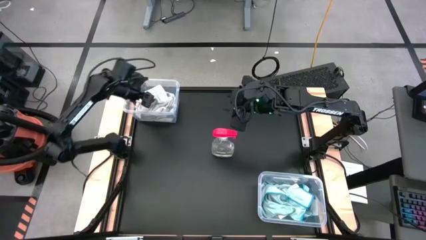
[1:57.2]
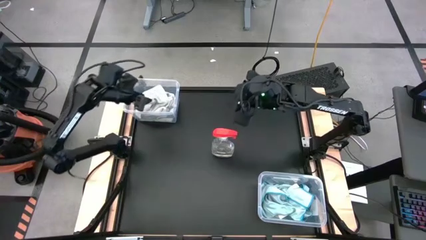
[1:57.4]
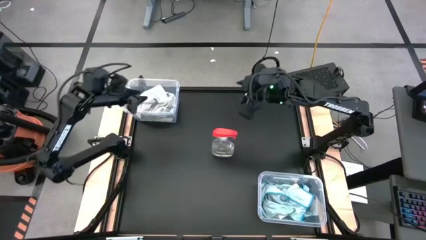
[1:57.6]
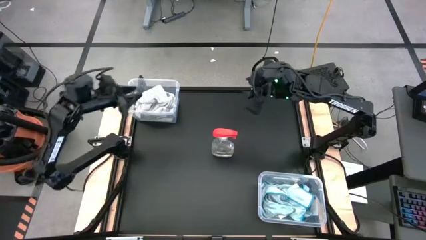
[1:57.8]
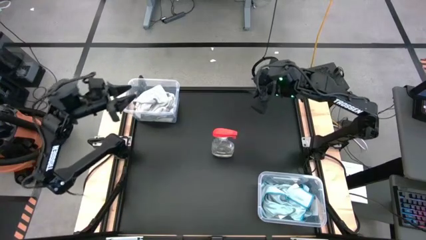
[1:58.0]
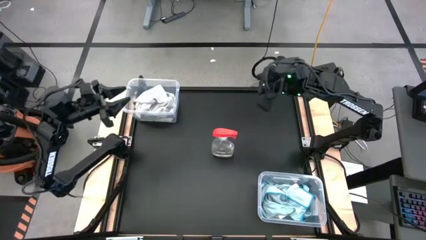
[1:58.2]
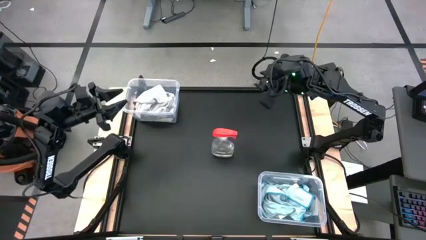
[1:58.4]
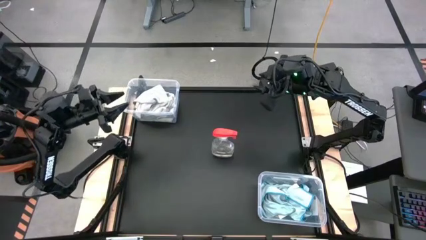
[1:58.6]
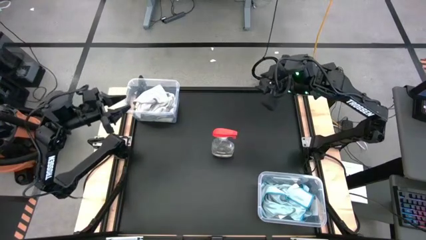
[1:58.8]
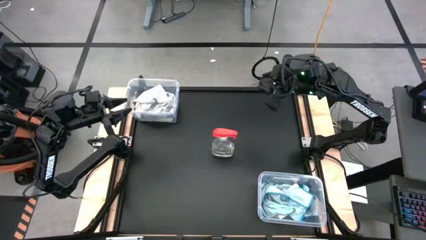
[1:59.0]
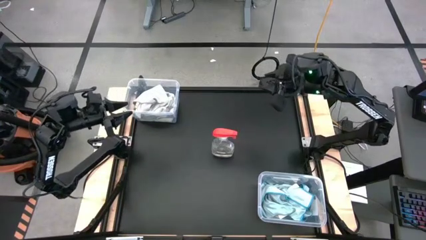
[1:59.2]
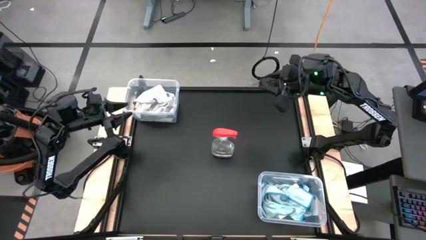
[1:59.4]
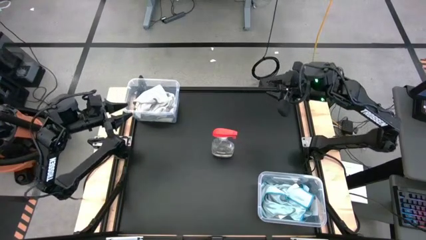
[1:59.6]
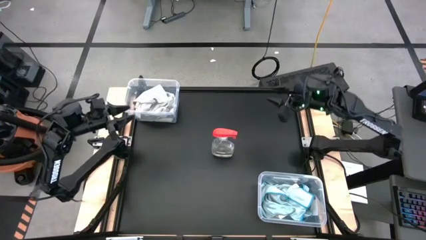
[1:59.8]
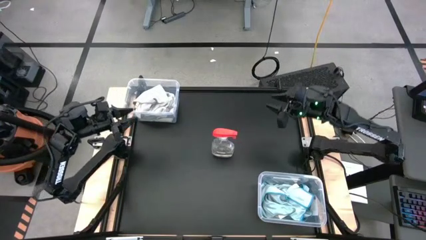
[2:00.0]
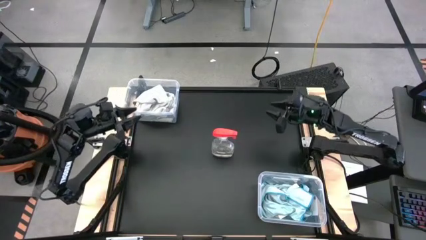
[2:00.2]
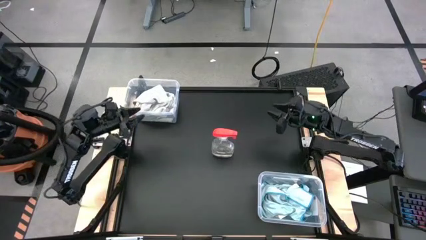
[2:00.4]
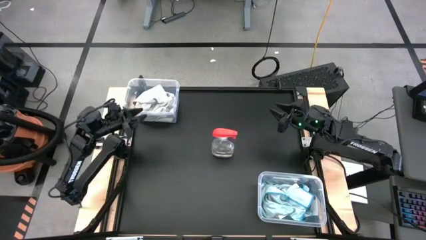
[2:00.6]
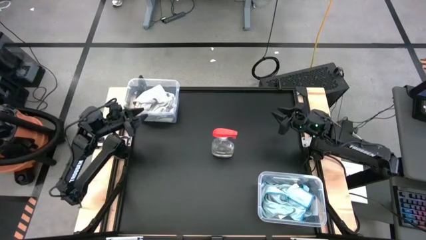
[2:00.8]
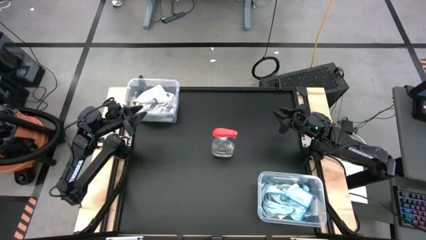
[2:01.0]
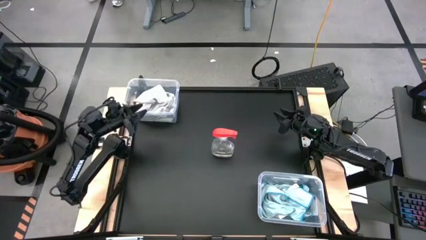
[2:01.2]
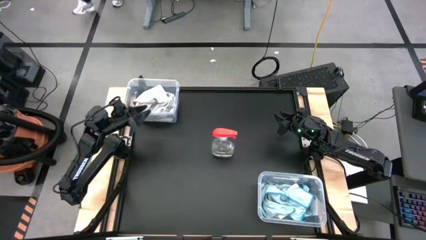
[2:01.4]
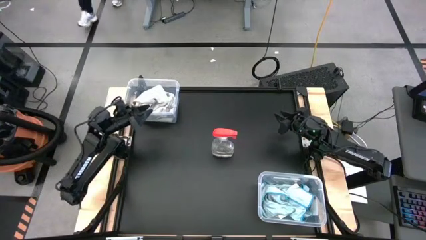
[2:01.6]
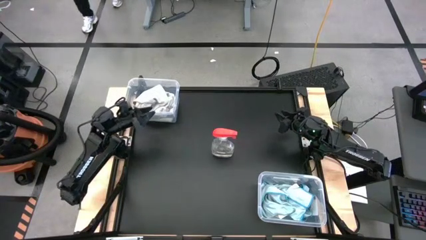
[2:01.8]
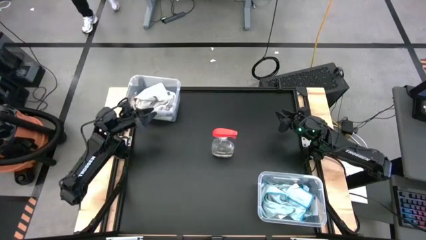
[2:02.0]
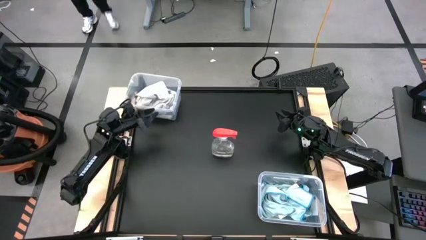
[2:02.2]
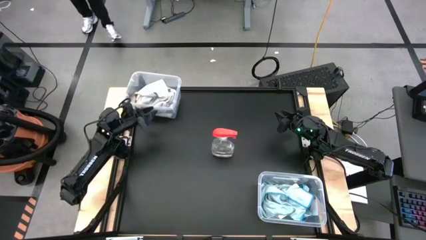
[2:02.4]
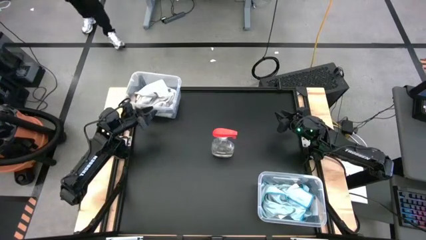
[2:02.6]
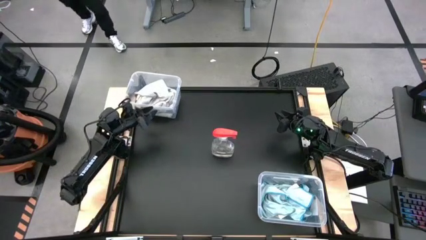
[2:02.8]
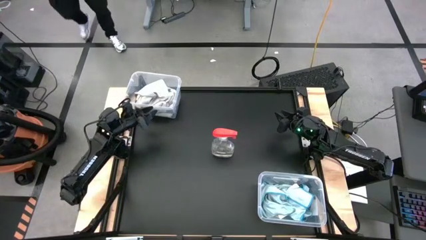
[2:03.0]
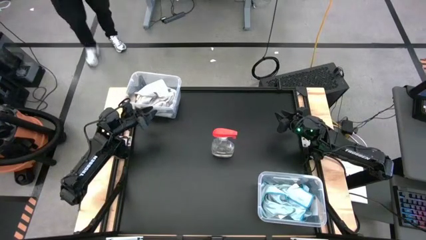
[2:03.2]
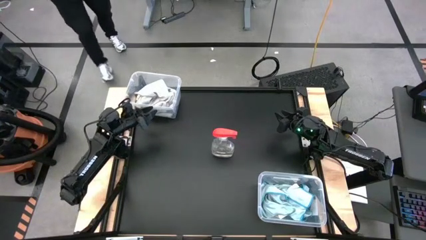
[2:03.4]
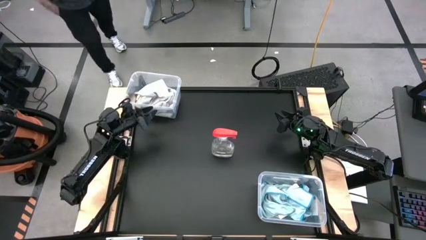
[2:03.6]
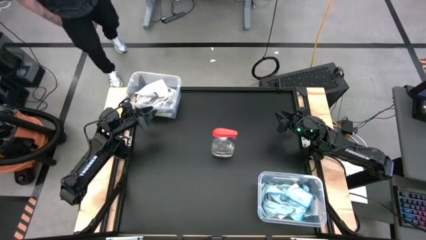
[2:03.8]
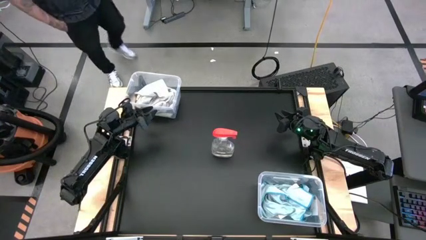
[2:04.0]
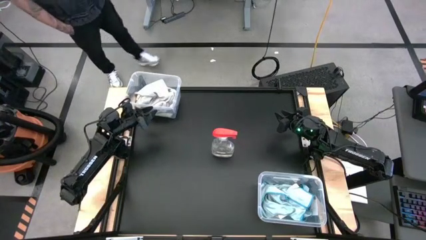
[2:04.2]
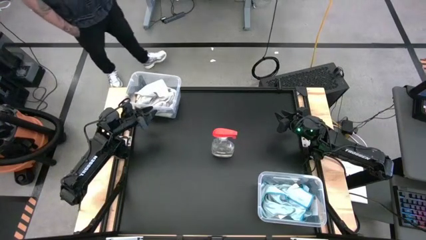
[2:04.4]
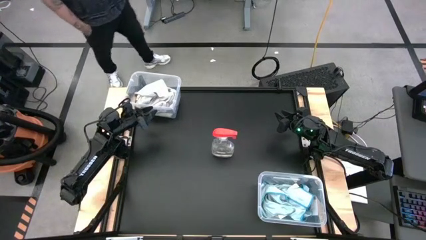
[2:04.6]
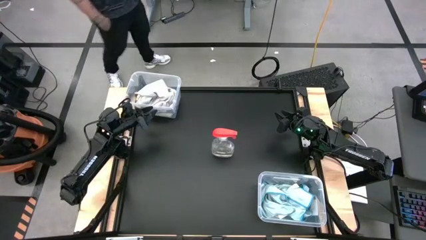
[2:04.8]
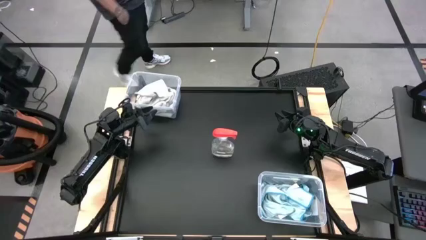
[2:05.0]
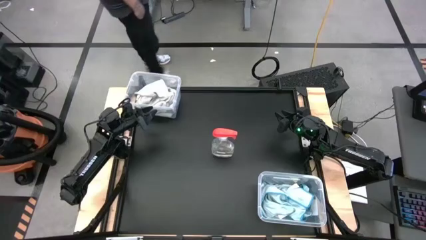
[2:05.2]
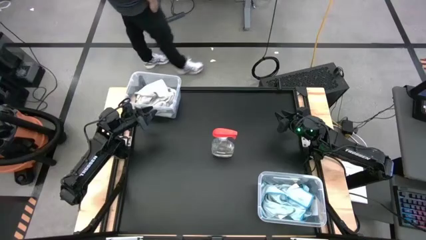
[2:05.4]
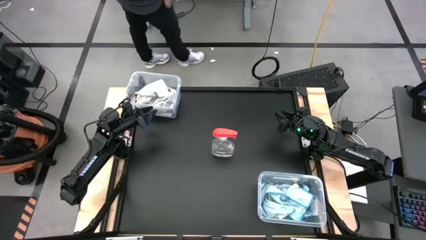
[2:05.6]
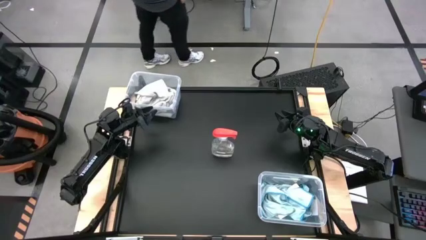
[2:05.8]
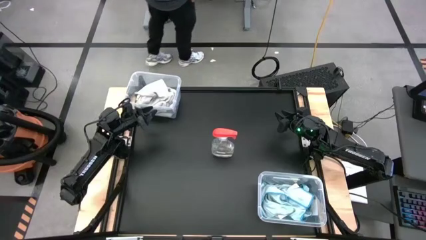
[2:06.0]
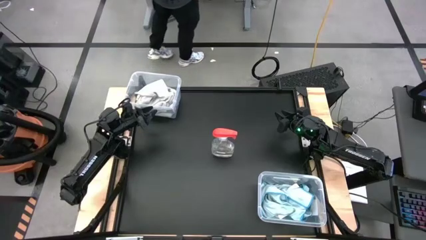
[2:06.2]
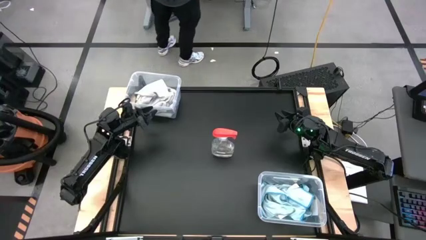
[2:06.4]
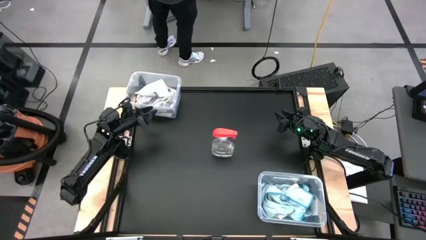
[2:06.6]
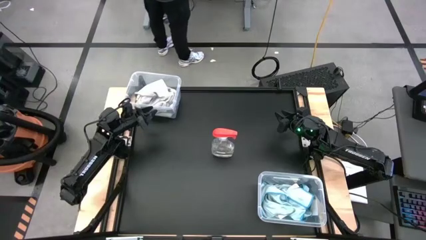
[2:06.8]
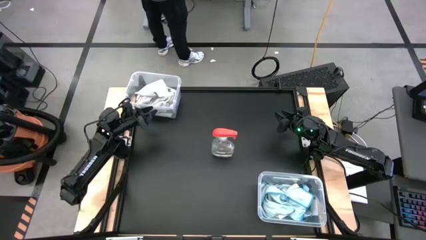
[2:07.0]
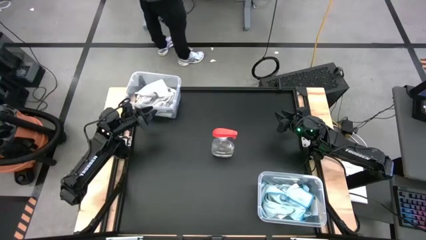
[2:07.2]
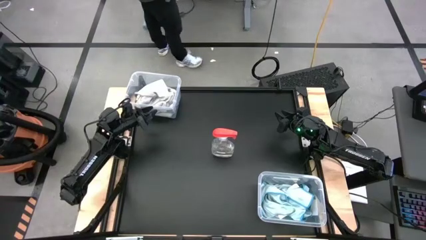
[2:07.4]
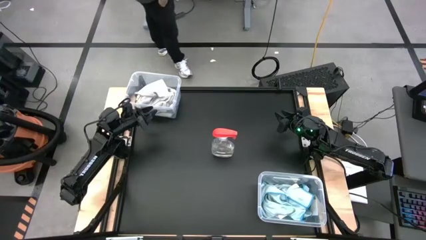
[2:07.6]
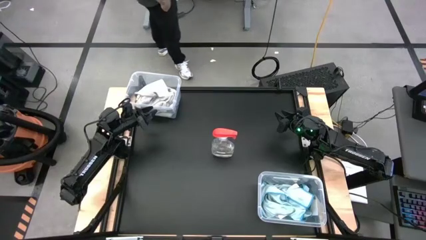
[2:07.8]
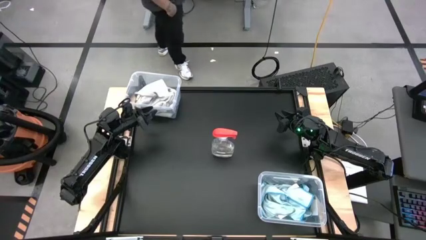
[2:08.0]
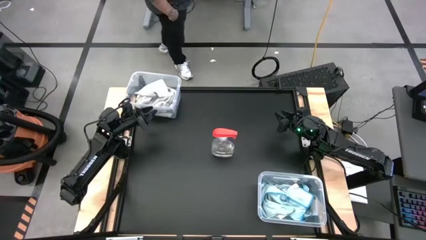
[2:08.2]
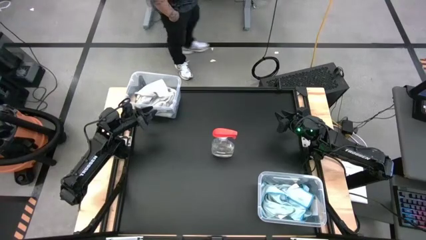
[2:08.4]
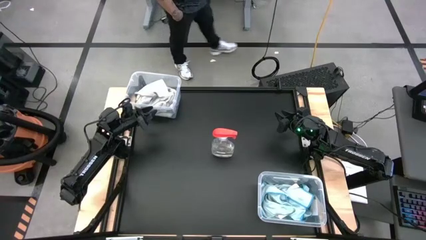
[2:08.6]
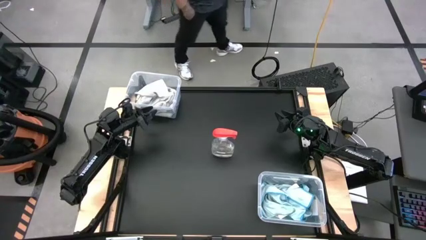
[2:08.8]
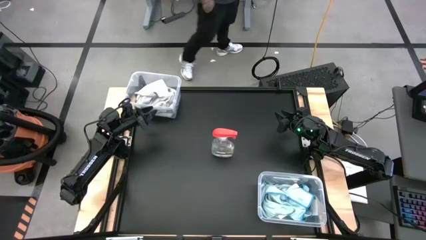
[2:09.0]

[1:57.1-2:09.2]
Task: Sort microfiber towel by color & place in baskets
Return to Home Position

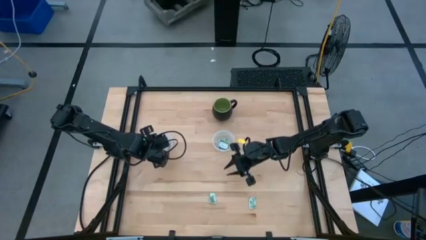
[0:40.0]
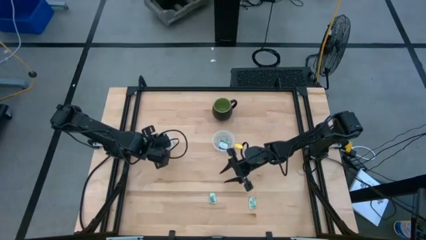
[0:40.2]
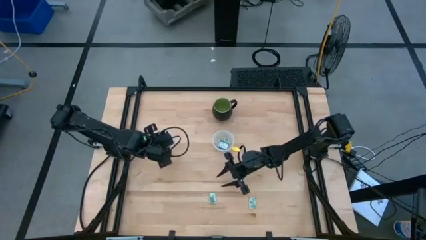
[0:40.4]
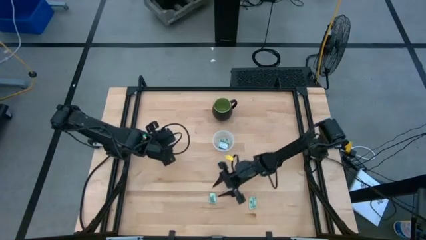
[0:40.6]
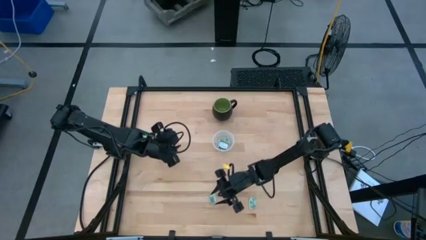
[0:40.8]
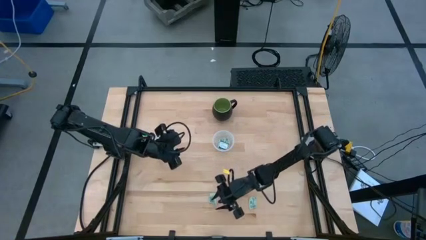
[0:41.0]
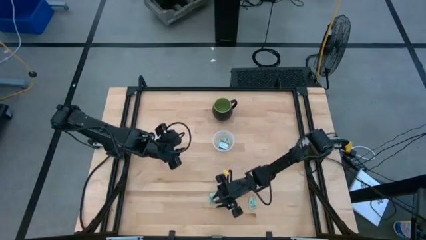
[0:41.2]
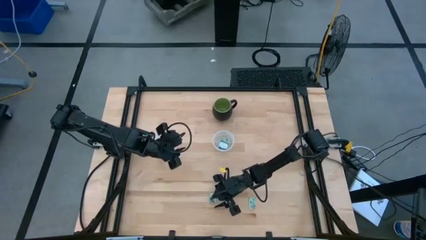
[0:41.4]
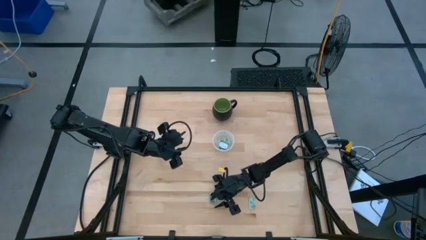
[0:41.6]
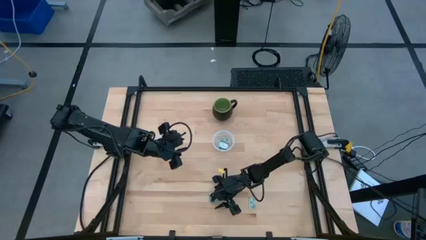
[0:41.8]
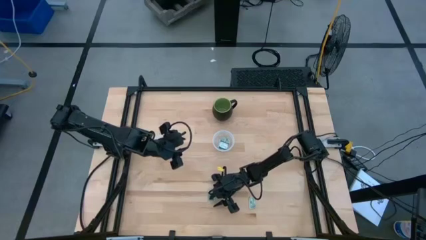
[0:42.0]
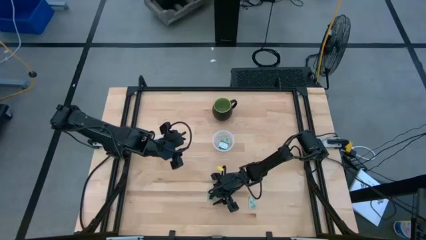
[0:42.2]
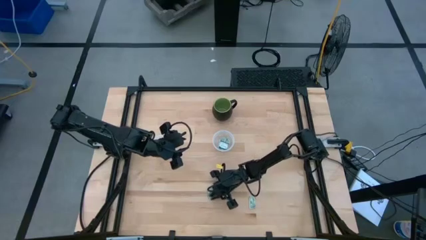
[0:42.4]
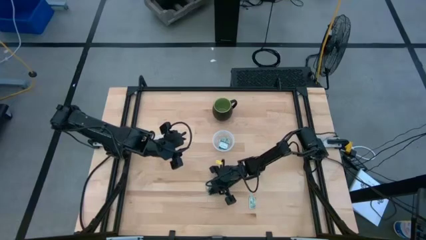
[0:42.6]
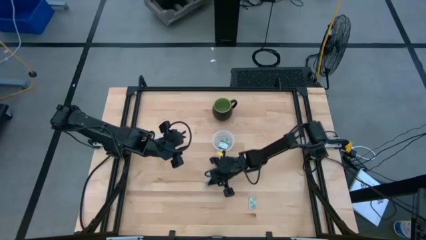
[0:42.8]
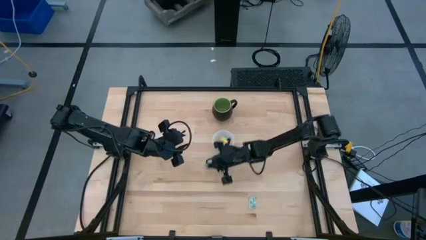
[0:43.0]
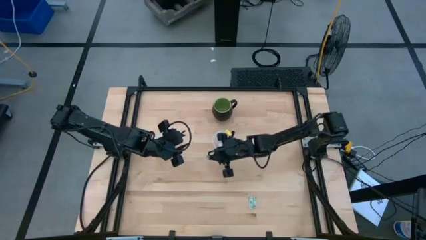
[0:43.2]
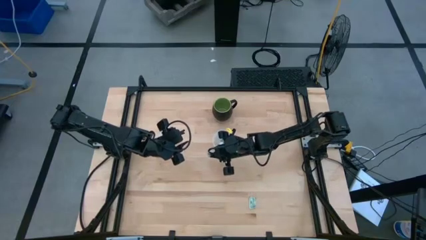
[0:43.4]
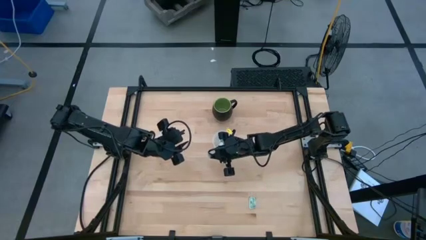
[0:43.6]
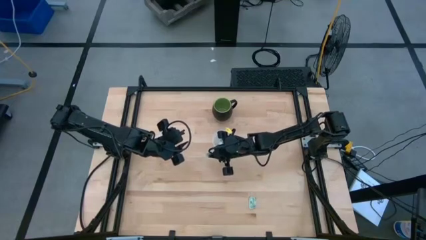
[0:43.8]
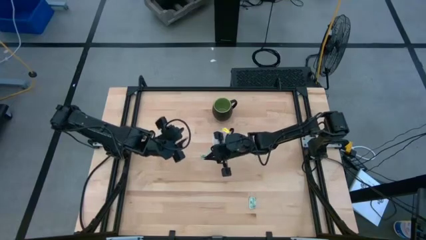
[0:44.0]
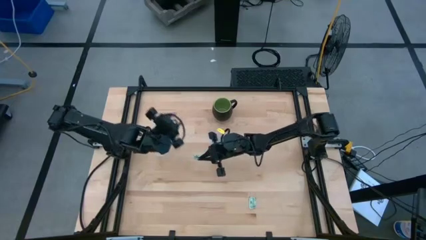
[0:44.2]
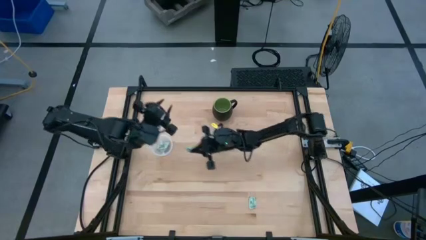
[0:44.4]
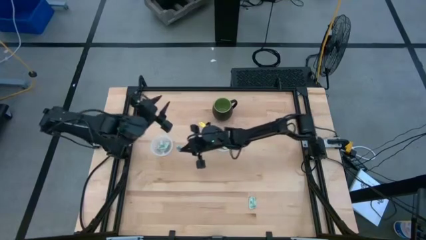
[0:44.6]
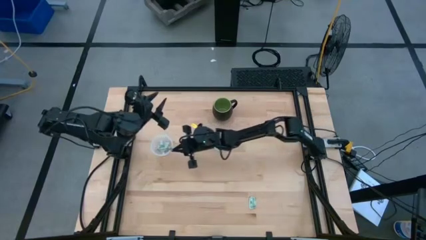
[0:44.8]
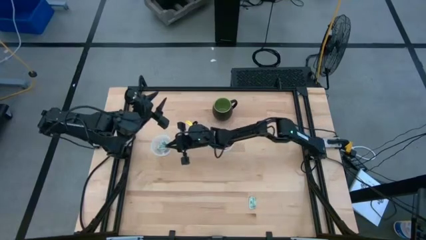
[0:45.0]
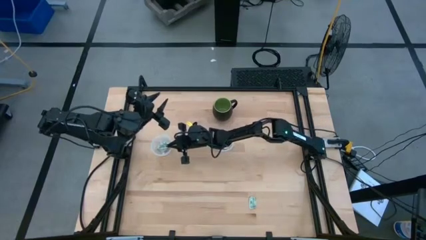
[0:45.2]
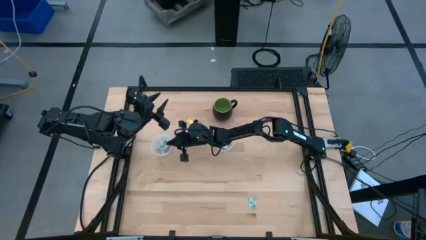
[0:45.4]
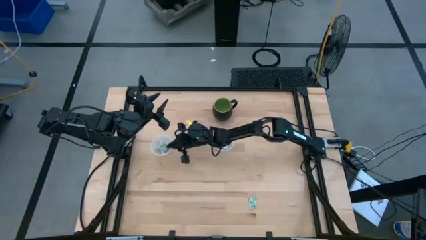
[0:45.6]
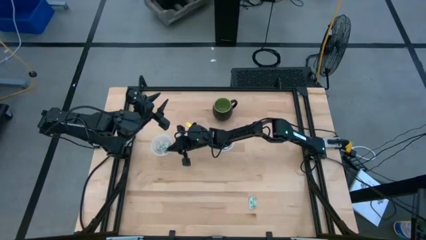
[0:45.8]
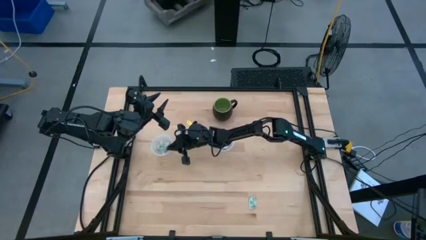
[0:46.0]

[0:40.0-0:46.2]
Task: Pick and place Stevia / Truvia into bins
Put the white stevia packet into the left transparent container
